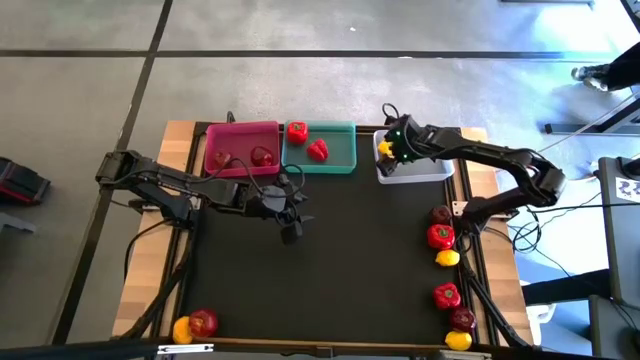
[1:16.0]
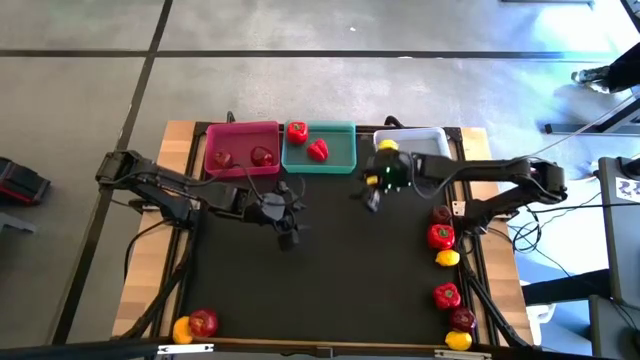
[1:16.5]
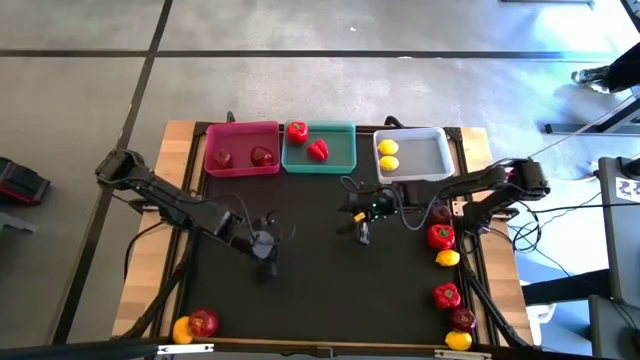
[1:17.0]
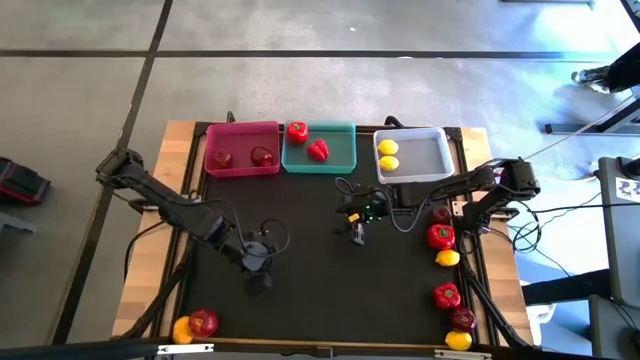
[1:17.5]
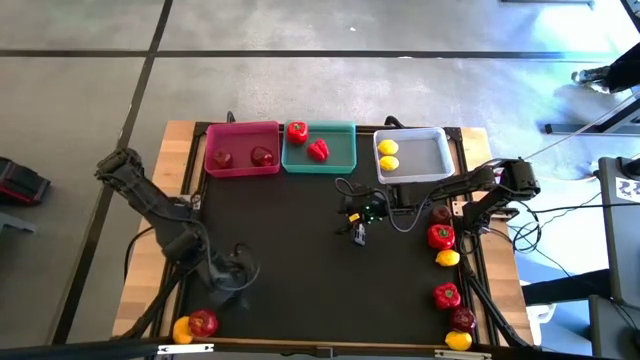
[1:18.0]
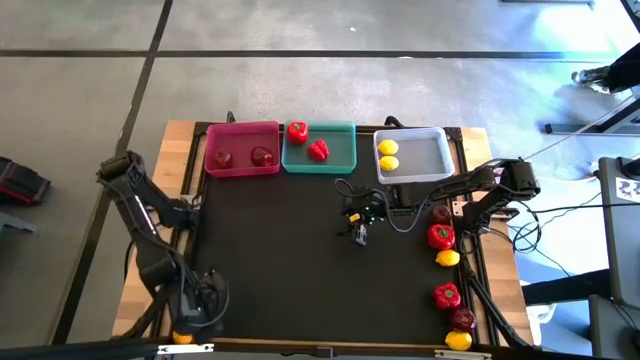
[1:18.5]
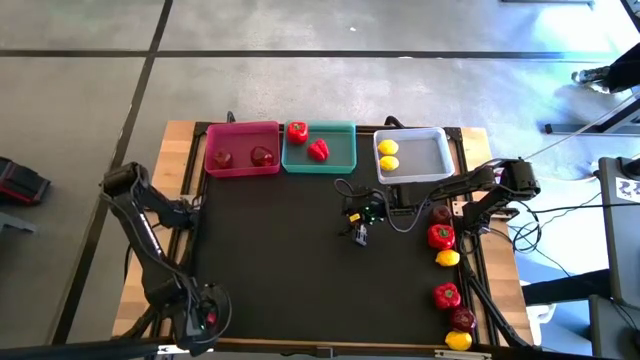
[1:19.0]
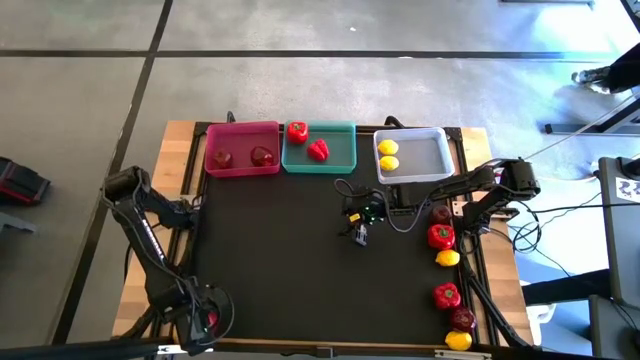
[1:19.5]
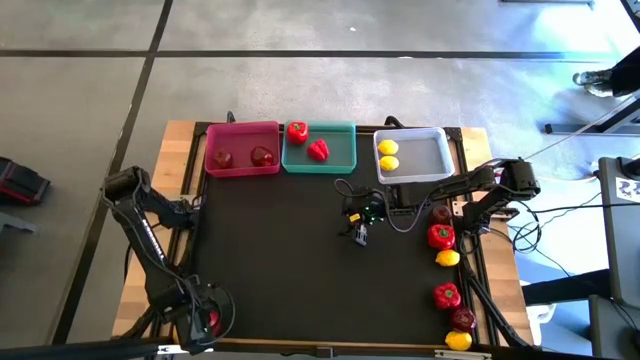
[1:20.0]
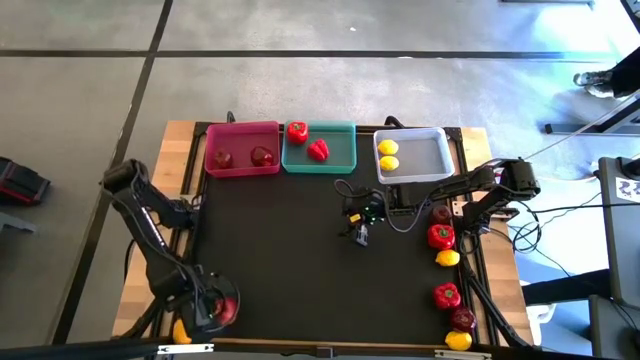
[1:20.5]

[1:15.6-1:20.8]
Task: Sort produce into baskets
Put the apple into the pink bin

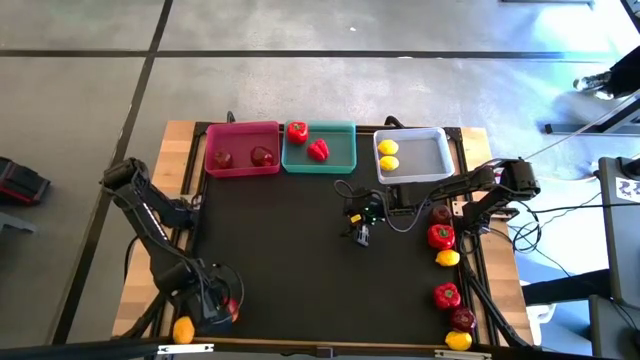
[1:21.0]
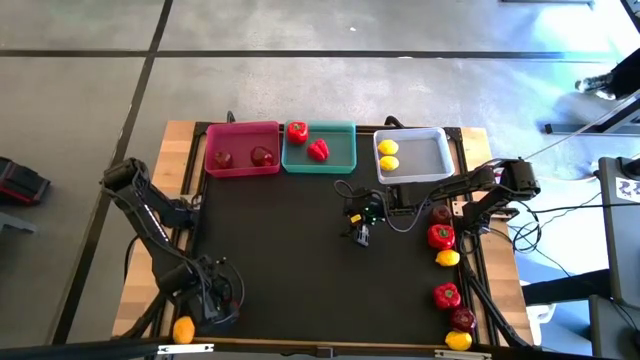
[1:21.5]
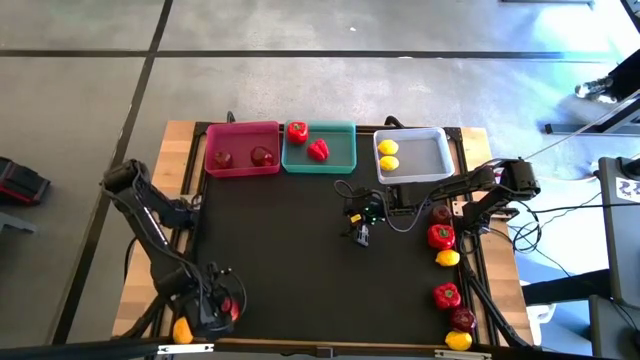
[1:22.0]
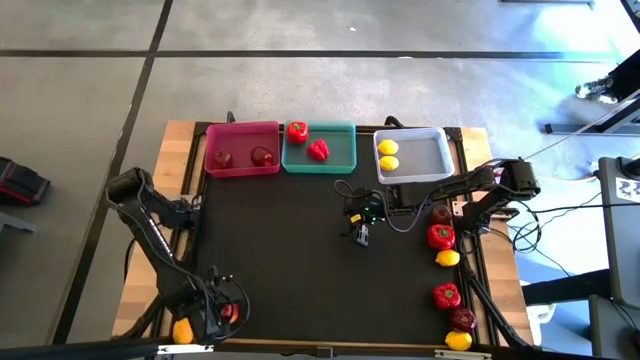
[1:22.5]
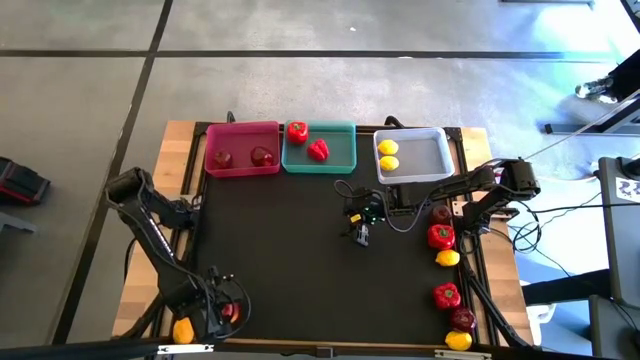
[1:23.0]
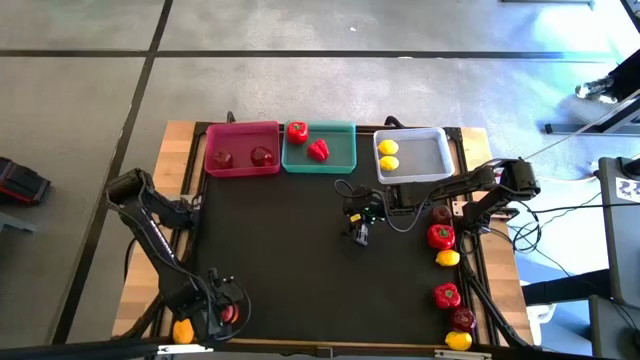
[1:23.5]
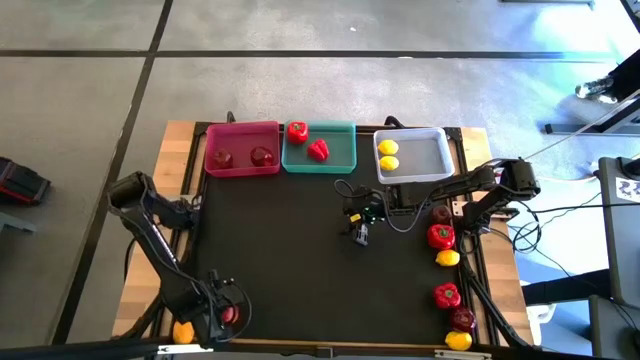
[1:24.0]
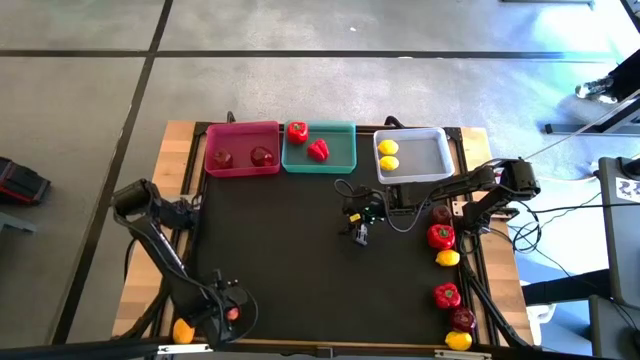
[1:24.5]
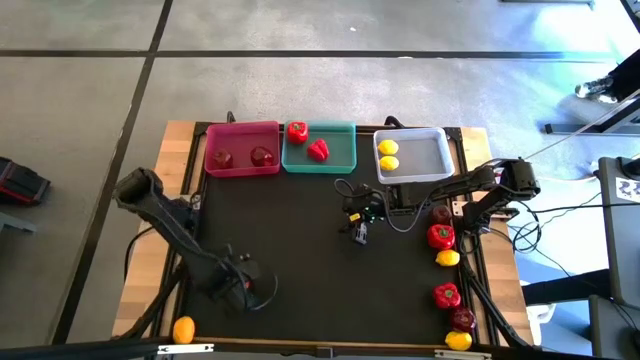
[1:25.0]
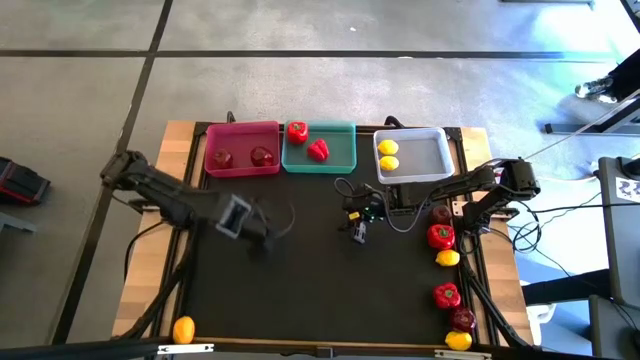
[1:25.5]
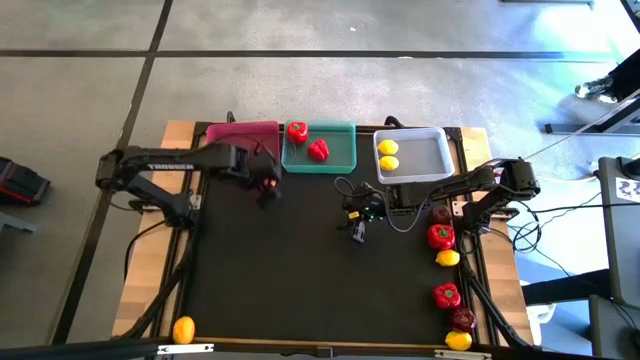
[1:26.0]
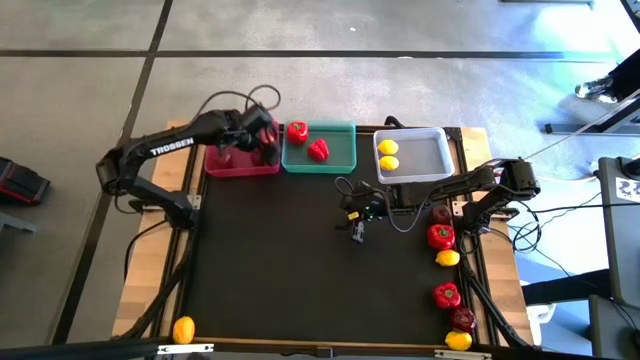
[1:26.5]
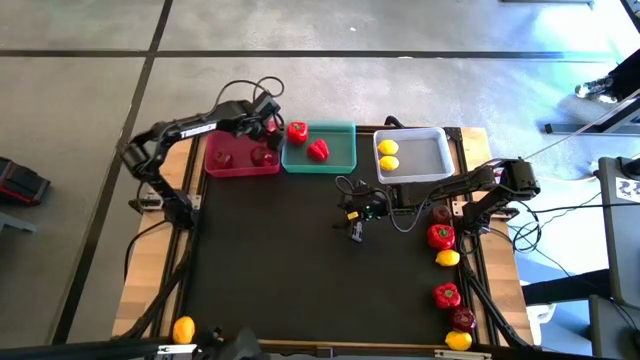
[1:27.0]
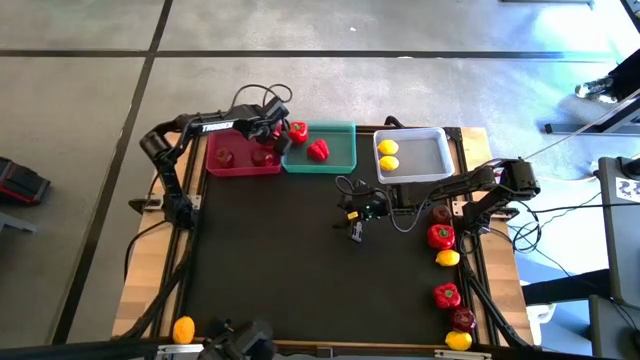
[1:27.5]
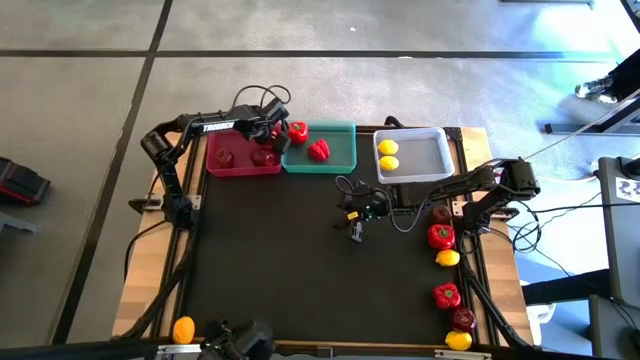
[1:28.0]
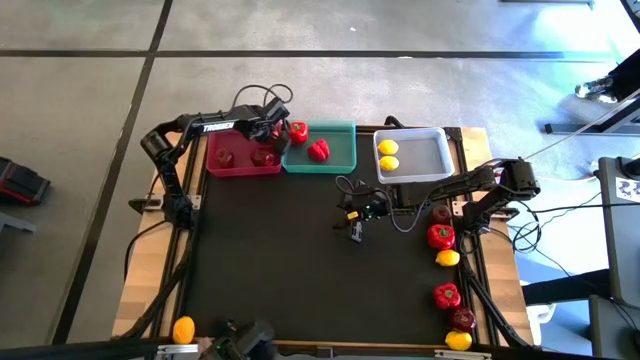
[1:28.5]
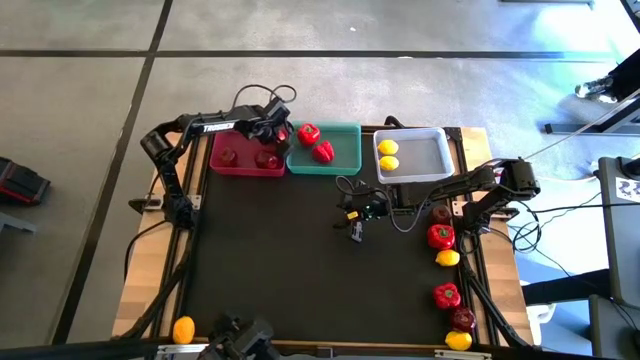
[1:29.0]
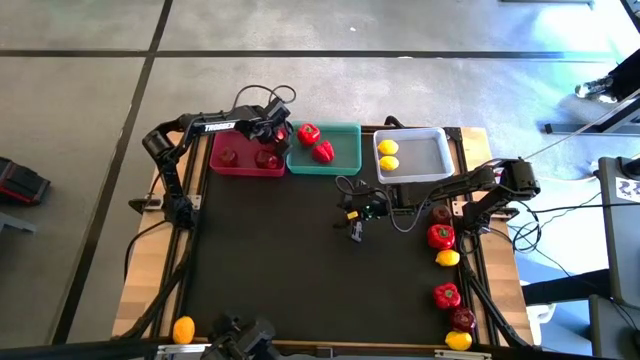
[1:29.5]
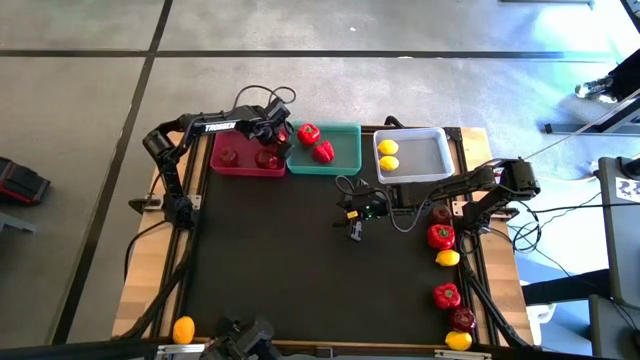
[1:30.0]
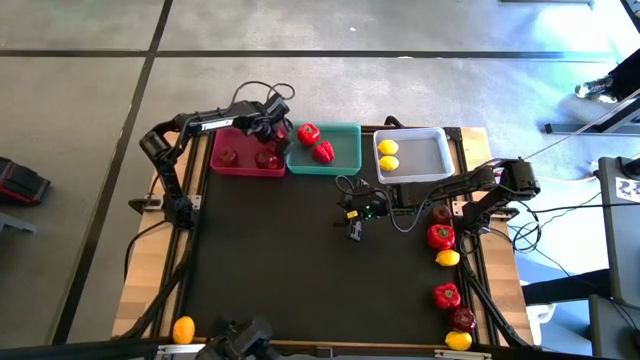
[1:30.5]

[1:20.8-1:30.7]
Put the apple into the pink bin

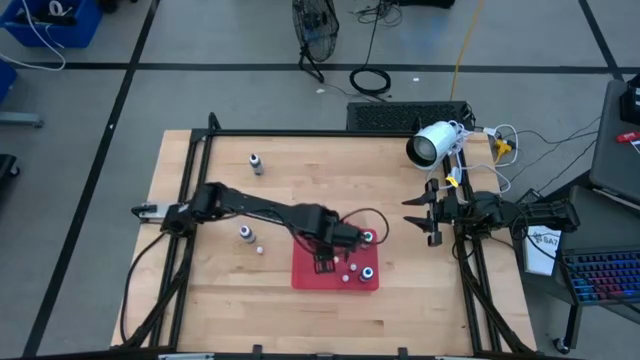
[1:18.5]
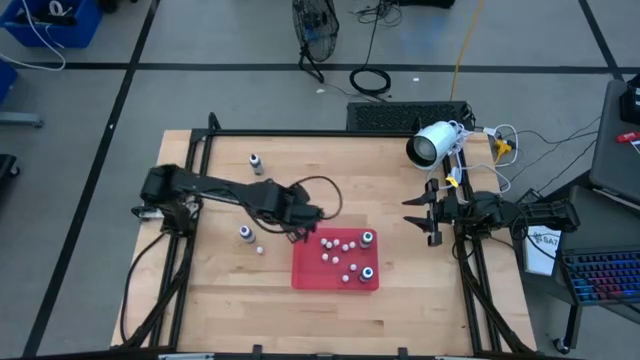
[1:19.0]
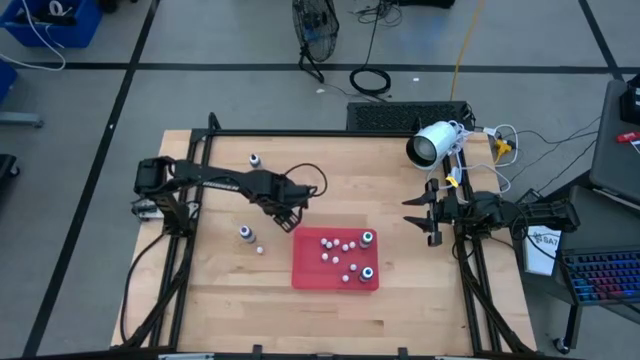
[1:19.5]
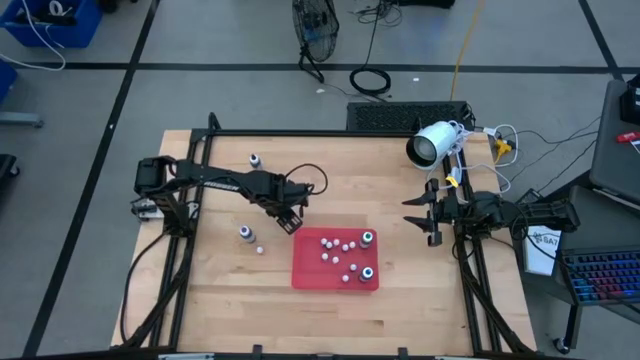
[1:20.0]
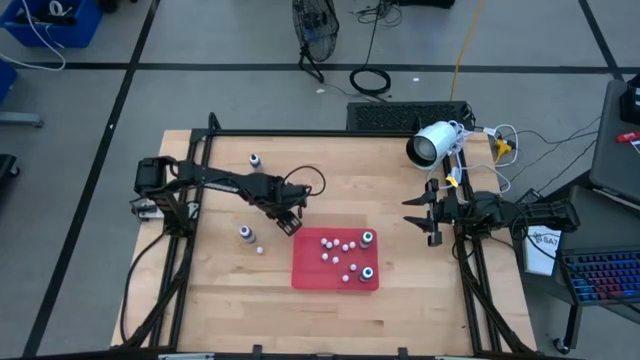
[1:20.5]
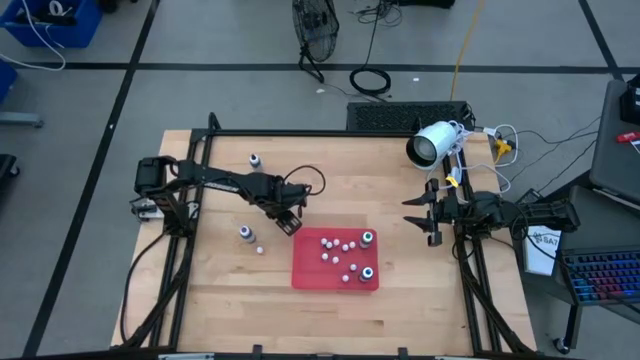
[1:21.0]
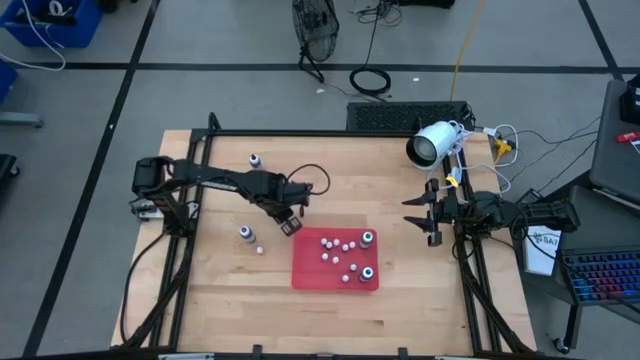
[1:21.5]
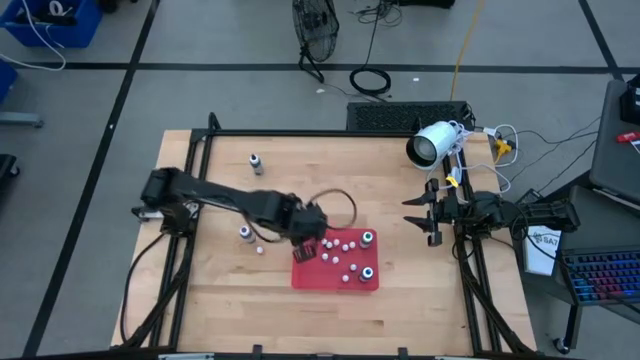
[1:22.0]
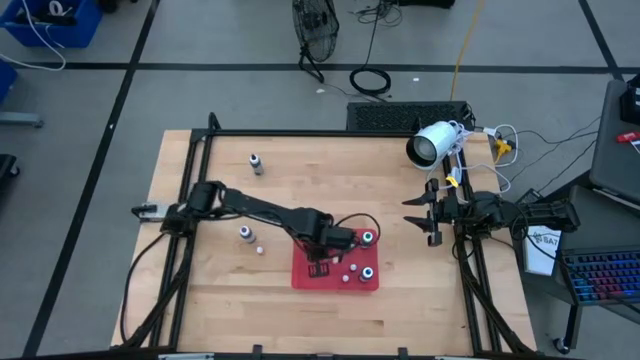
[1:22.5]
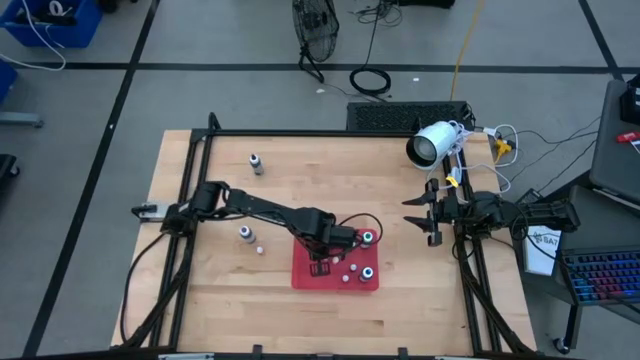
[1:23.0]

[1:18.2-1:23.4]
Task: Pick & Place food coloring
Put the small black food coloring bottle into the red bin
